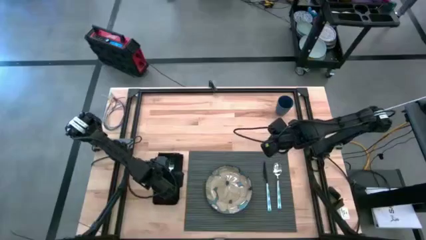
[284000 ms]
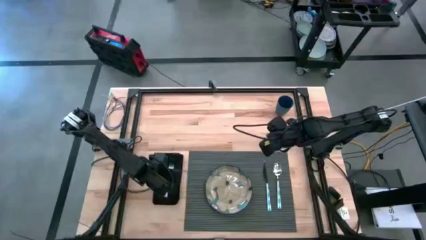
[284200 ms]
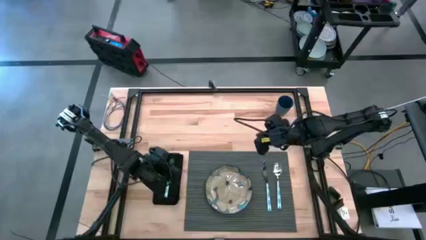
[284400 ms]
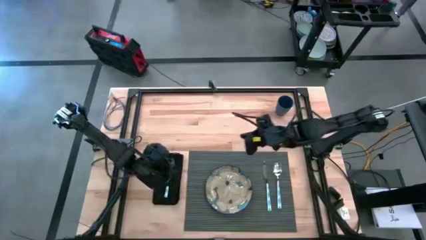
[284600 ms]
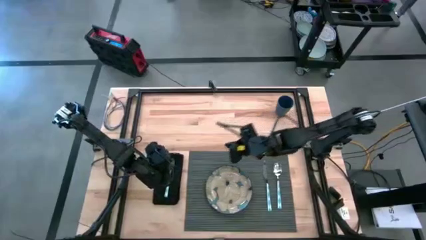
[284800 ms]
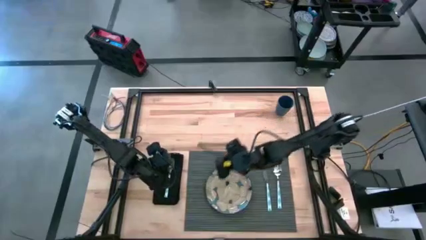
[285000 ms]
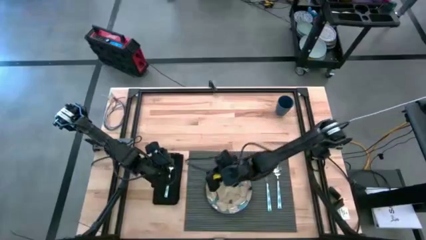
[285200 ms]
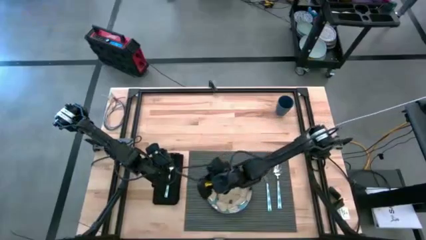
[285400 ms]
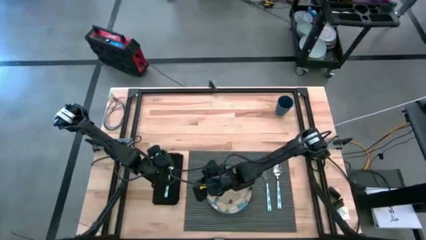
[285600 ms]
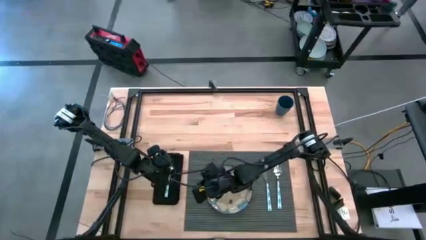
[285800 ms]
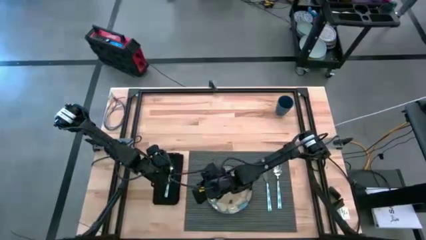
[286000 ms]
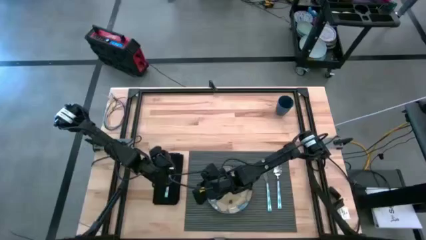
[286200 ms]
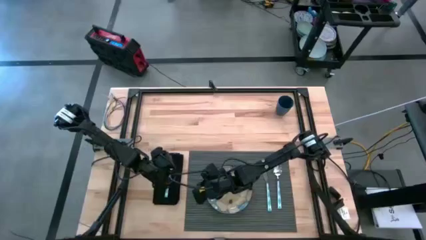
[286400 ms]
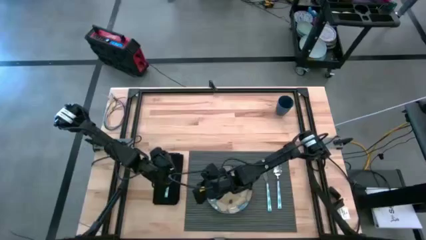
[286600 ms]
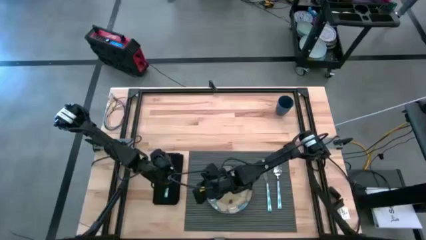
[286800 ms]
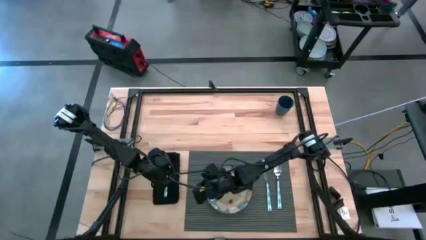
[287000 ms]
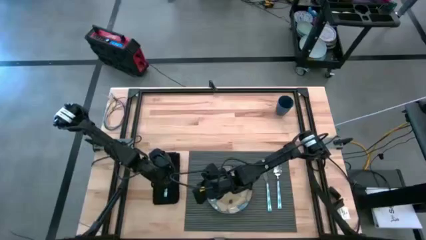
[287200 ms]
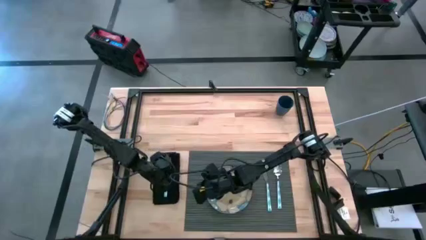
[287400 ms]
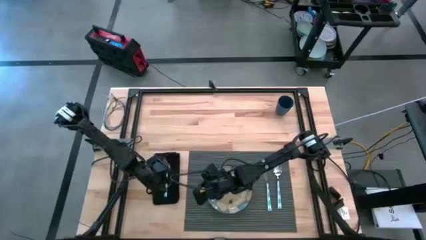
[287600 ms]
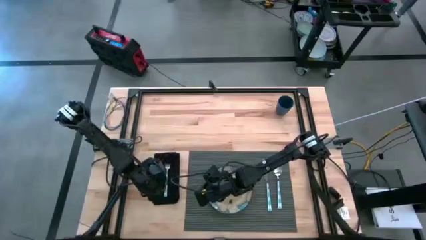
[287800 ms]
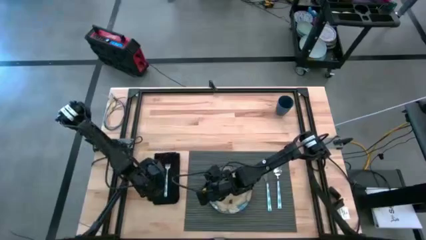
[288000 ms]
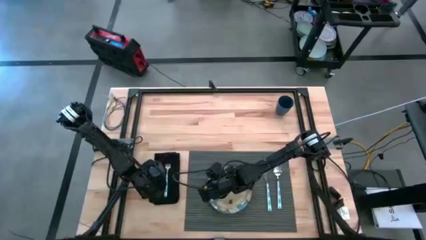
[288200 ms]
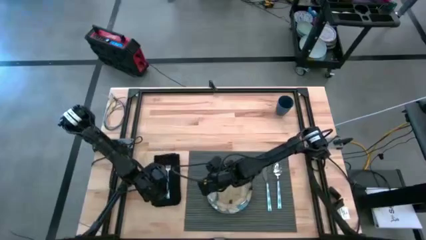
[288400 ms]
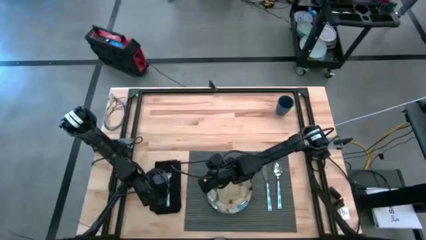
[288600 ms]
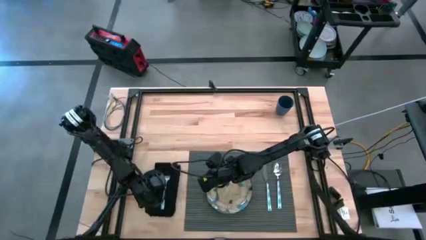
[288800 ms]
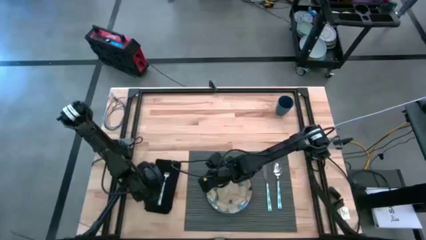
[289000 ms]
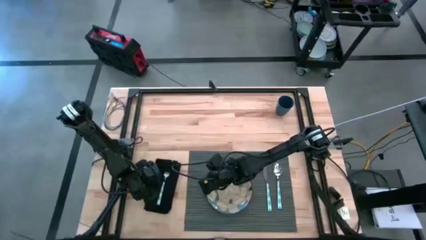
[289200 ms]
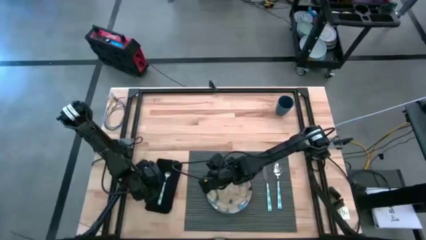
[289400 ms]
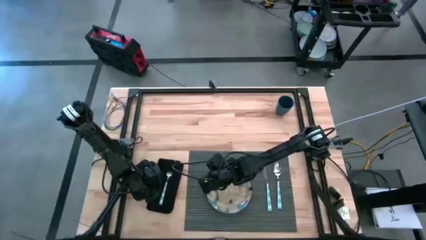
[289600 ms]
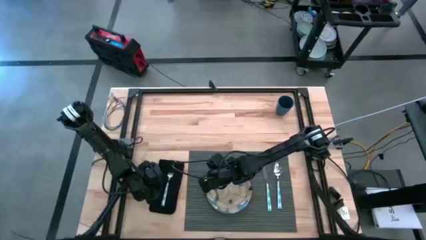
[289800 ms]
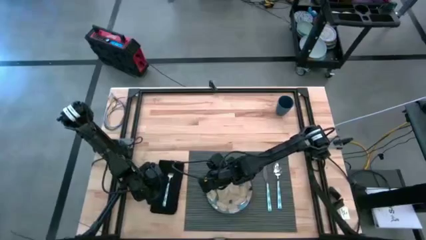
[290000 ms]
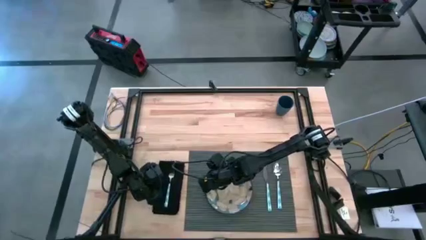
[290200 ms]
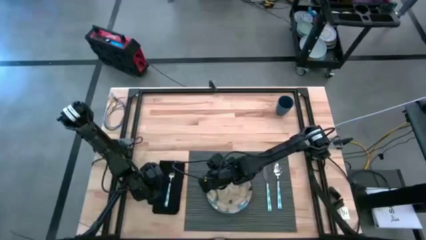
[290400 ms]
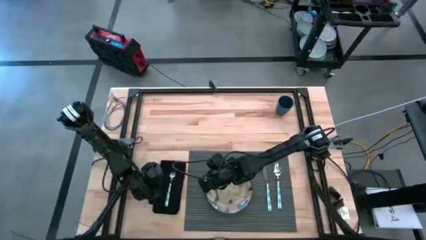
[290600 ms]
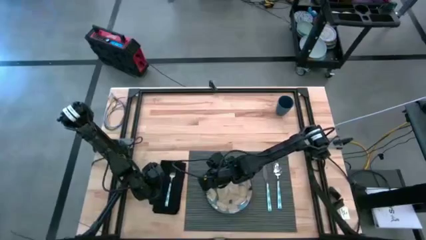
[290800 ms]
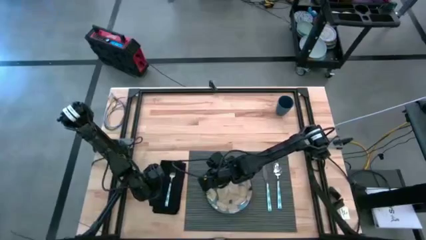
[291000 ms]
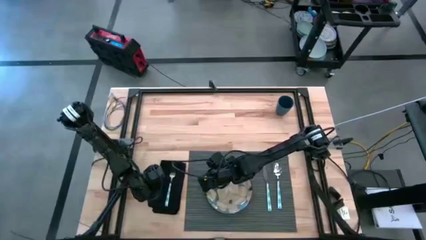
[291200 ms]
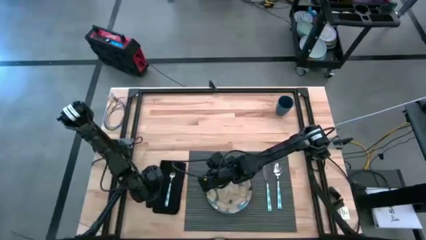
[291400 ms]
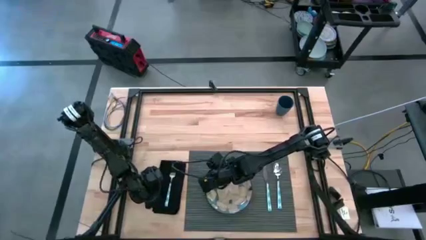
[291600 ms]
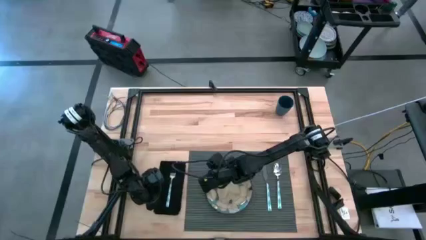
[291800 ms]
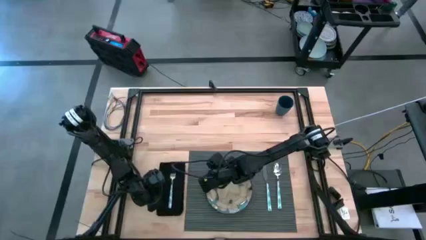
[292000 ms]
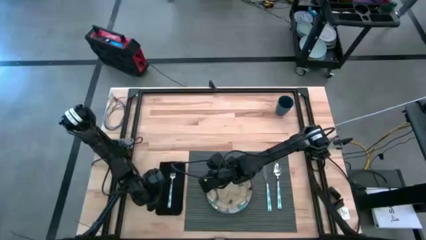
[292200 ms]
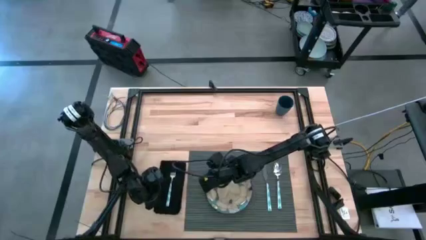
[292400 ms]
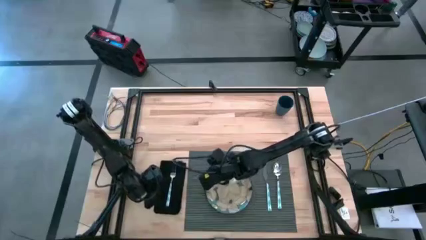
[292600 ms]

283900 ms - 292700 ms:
Task: Set table place
Adjust the folded black napkin on the table

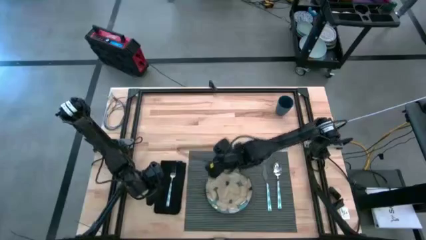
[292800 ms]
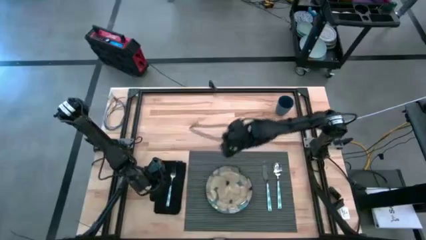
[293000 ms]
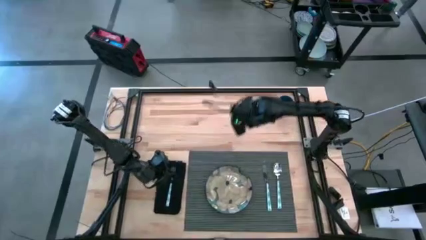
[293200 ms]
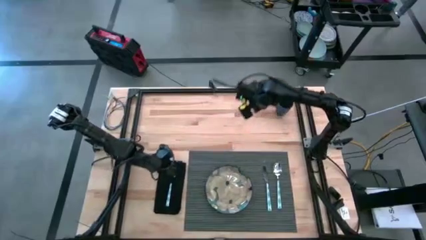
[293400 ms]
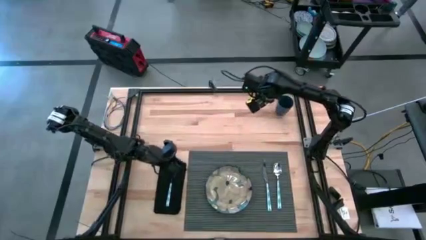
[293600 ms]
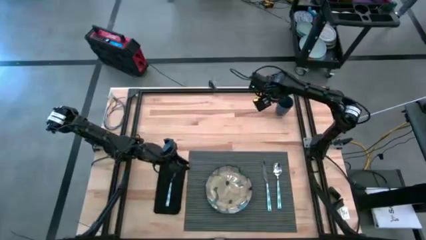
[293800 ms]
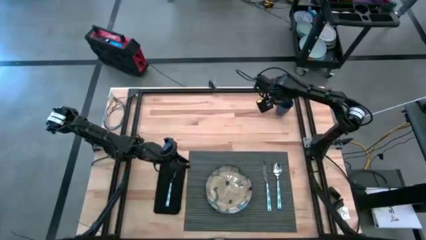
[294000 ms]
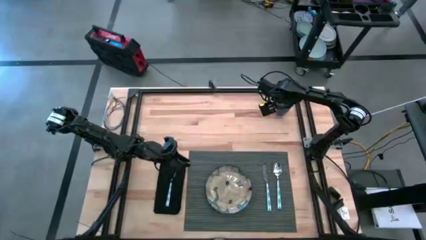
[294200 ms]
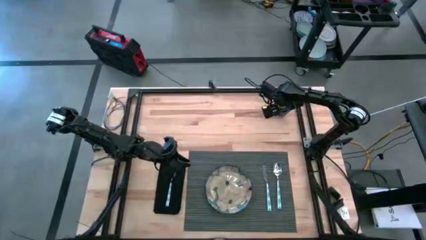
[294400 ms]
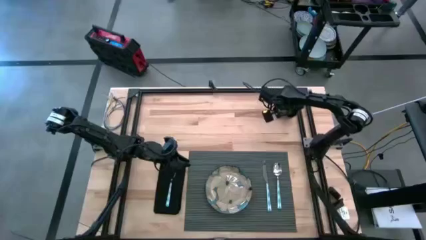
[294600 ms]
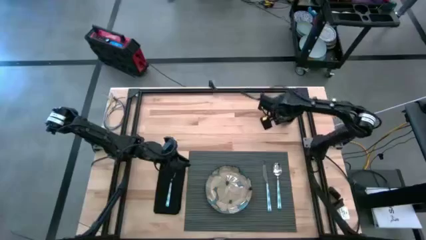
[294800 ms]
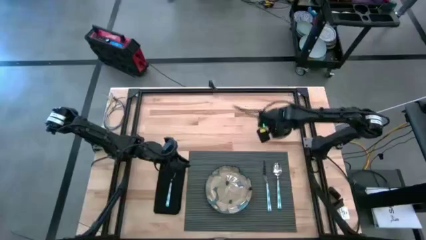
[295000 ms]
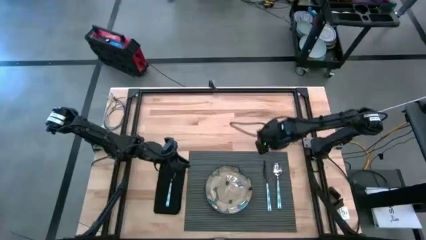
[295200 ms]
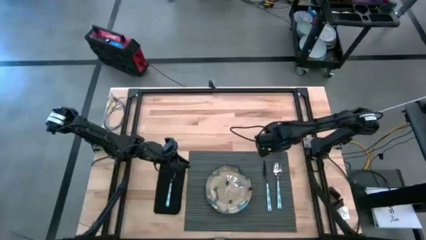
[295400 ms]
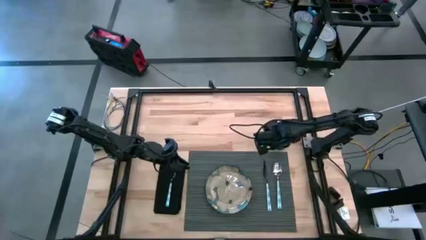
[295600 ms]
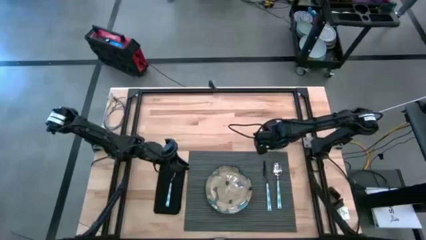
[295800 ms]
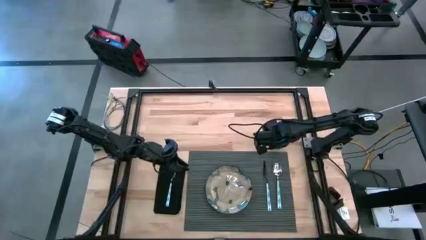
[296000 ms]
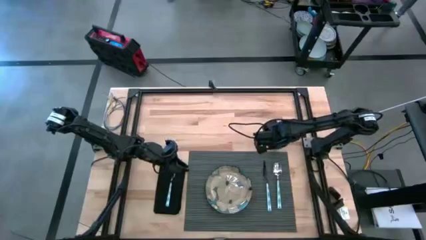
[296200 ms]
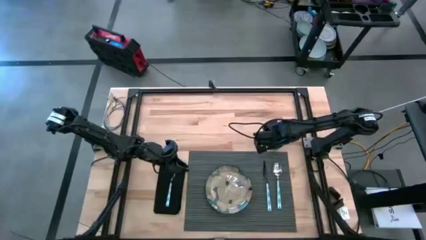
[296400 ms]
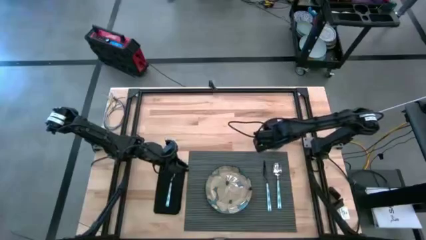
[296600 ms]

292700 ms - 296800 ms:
Move the blue cup to the top right of the gray mat

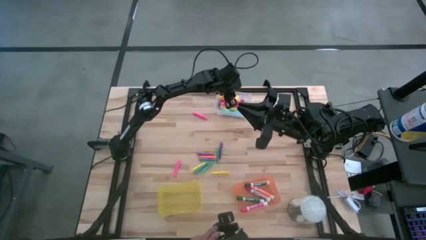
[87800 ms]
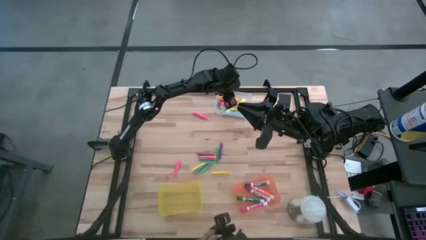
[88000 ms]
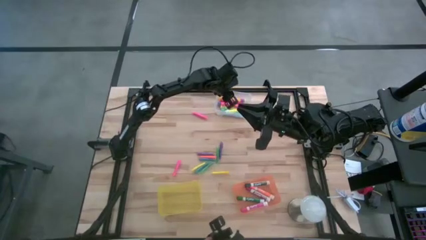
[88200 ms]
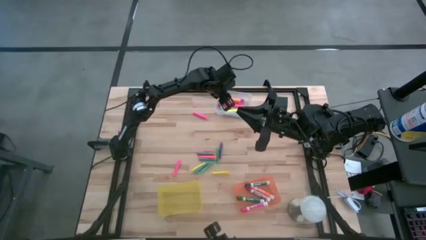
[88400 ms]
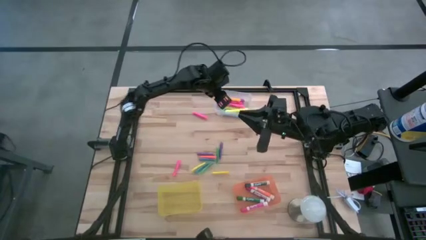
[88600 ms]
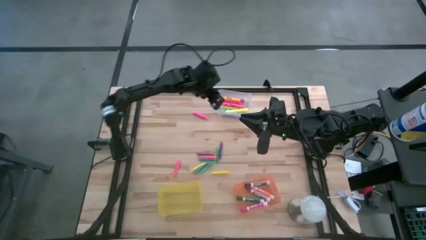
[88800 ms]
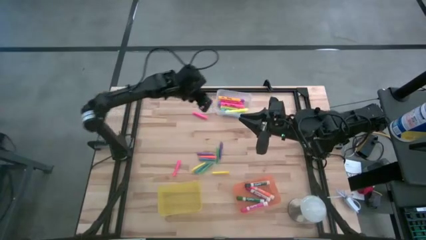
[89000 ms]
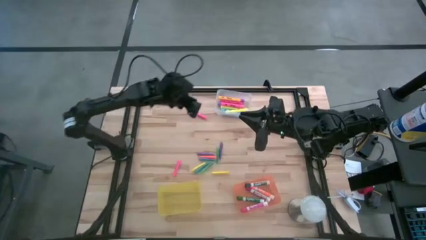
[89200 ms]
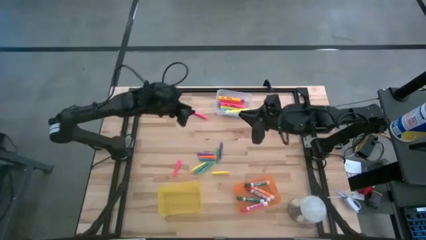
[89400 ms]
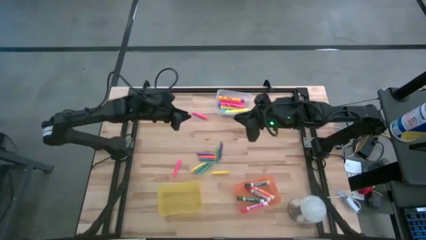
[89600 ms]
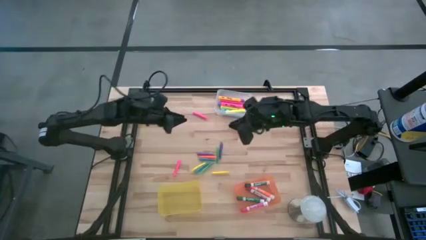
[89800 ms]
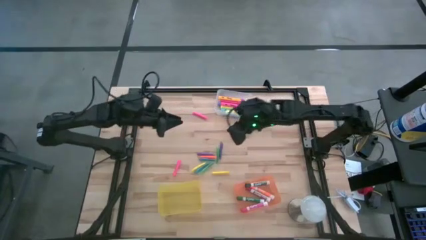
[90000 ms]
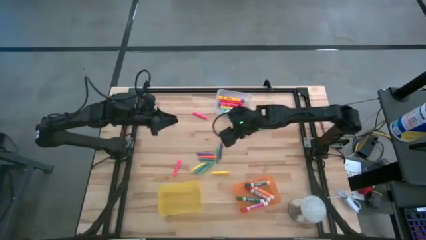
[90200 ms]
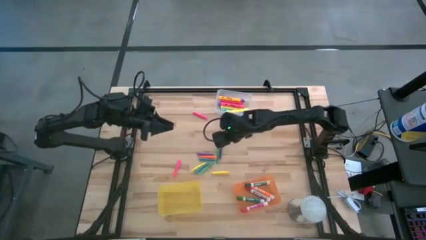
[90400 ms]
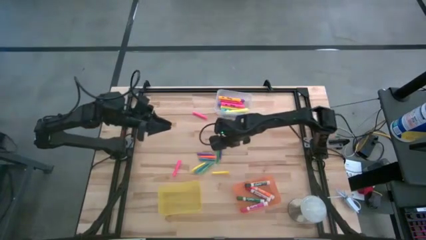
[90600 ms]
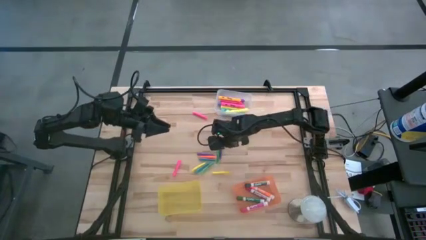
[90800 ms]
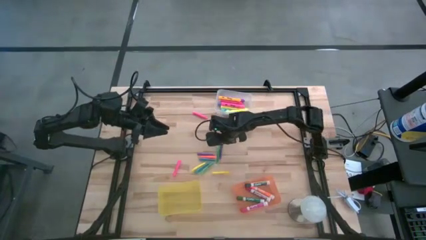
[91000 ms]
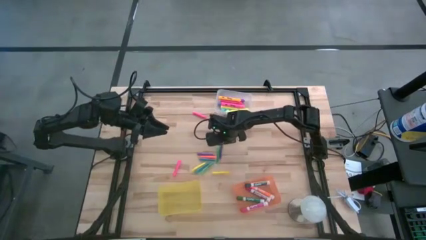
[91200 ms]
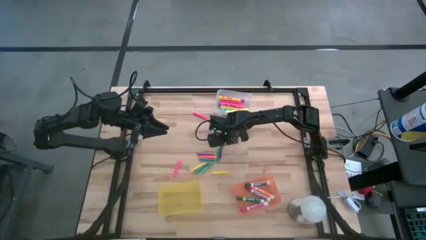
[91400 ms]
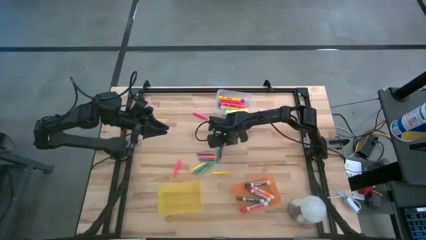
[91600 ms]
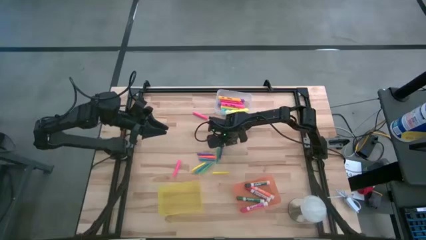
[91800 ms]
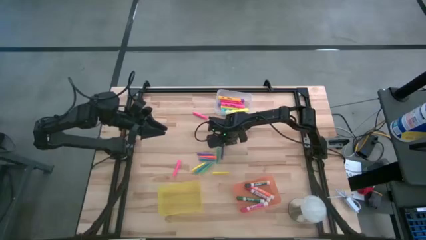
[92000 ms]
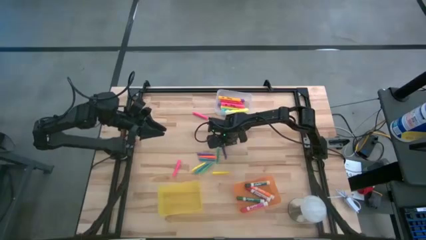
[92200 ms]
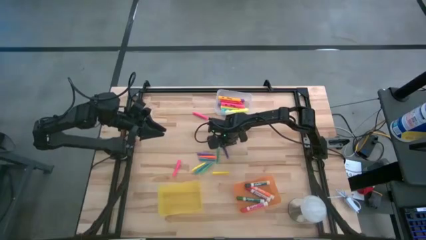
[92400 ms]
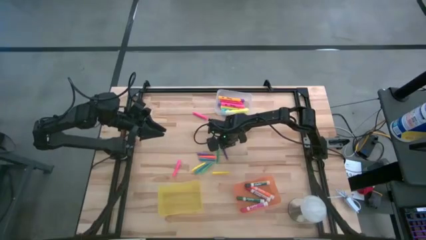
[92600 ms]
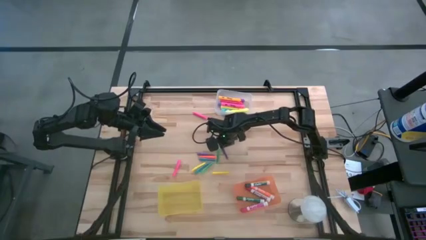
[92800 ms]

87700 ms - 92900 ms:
Task: Pick & Place Markers
Put the right purple pen into the yellow bin
